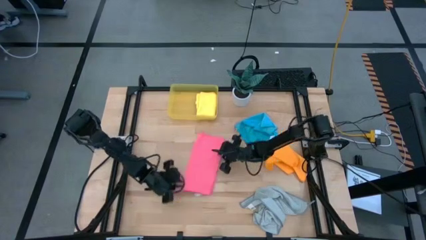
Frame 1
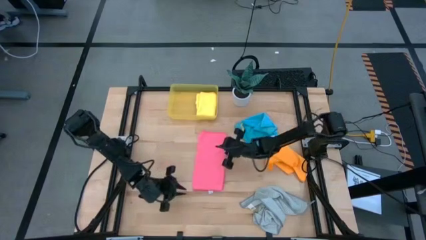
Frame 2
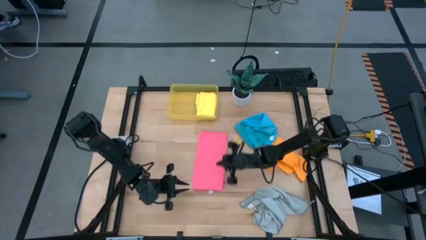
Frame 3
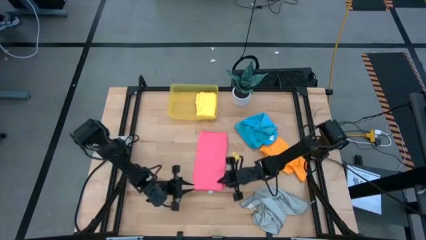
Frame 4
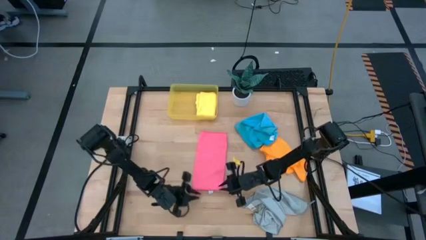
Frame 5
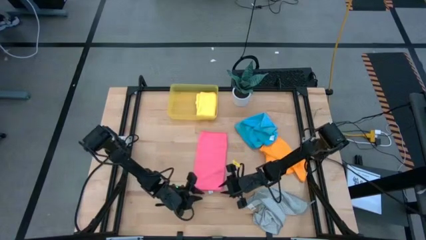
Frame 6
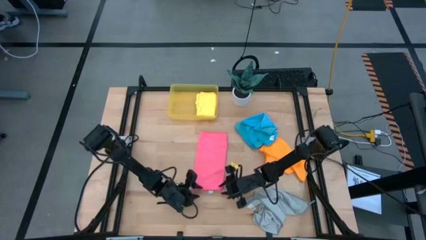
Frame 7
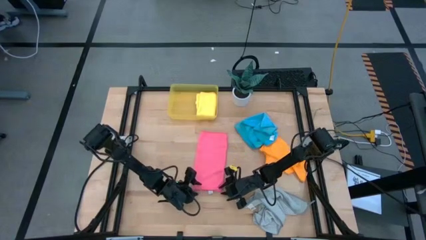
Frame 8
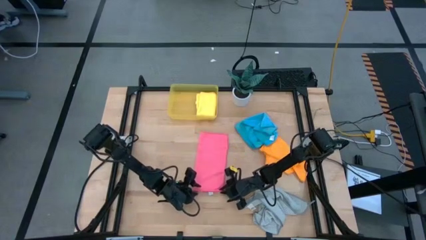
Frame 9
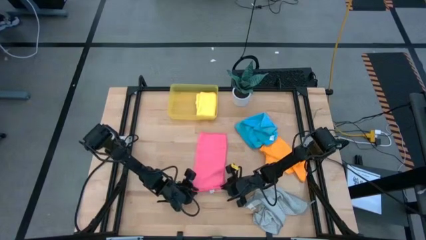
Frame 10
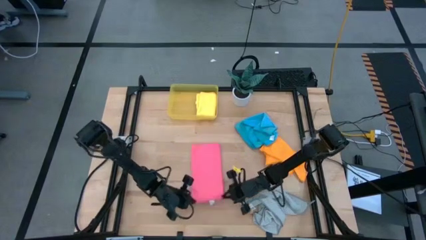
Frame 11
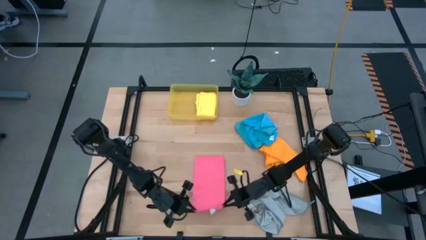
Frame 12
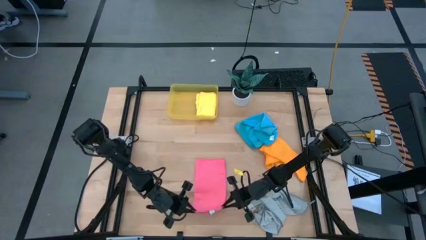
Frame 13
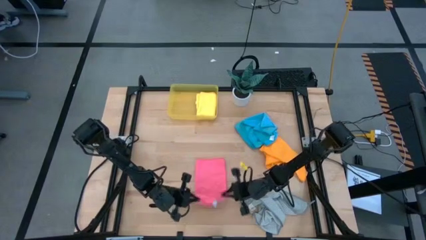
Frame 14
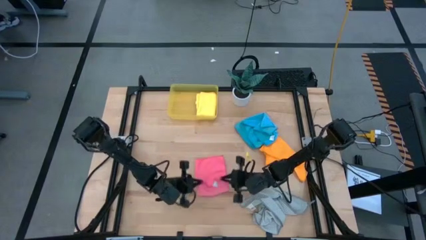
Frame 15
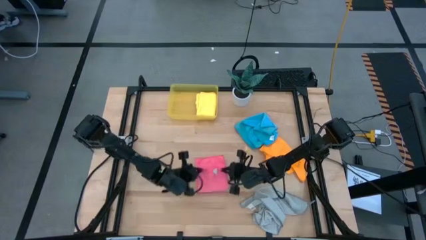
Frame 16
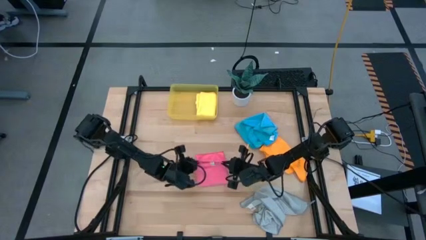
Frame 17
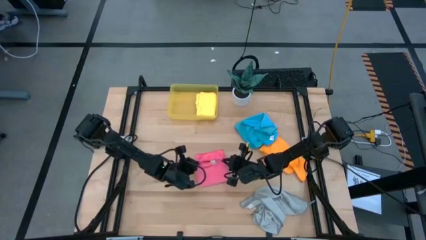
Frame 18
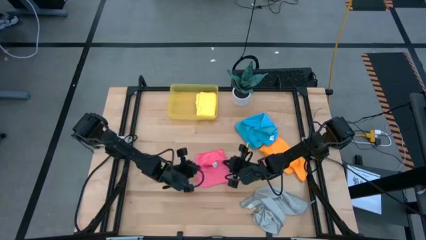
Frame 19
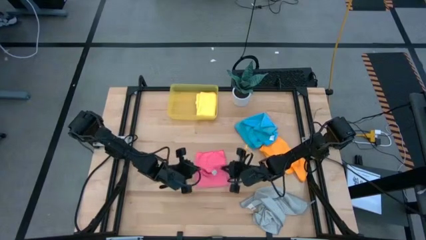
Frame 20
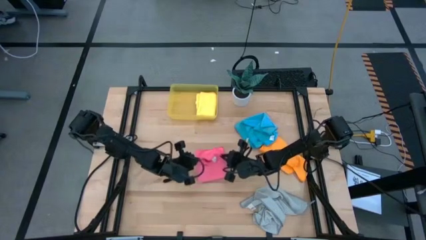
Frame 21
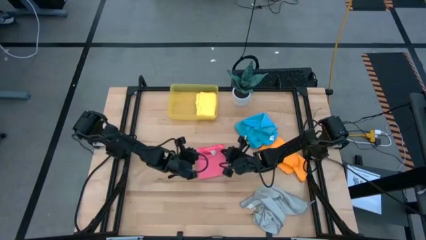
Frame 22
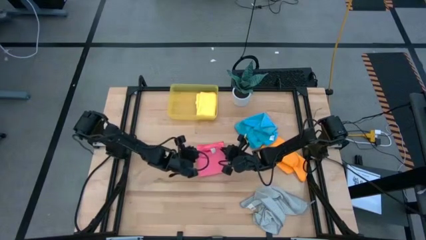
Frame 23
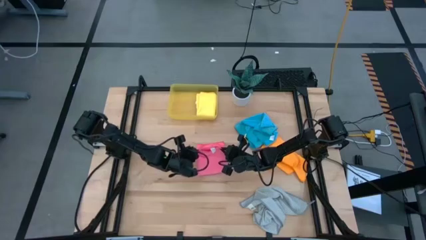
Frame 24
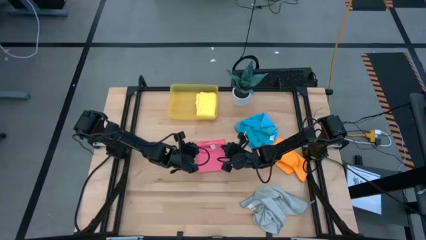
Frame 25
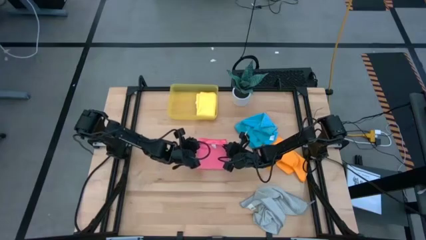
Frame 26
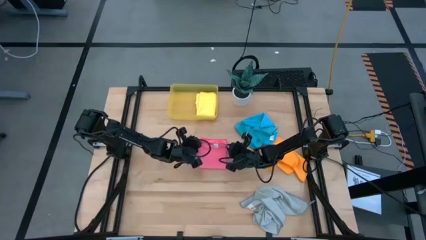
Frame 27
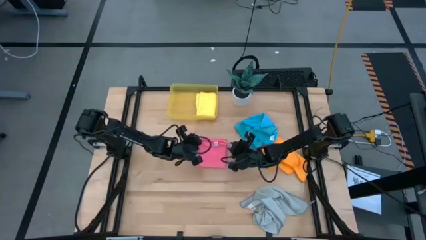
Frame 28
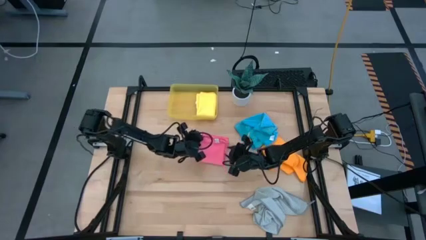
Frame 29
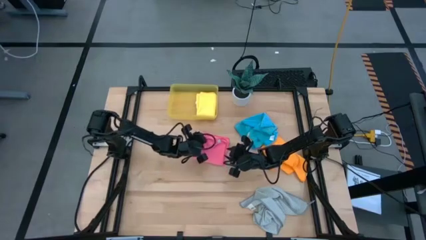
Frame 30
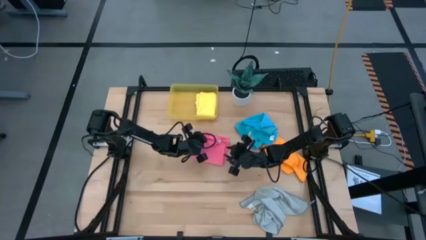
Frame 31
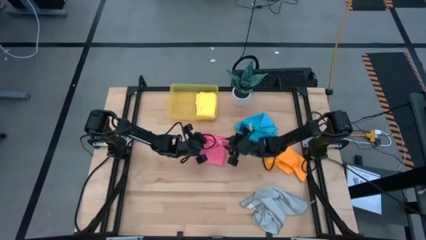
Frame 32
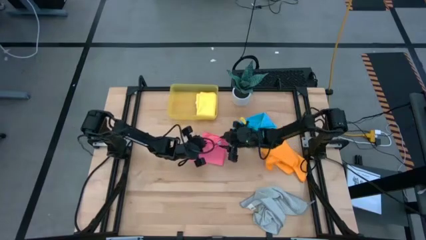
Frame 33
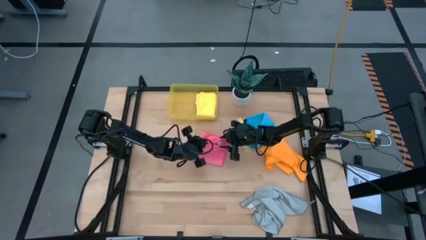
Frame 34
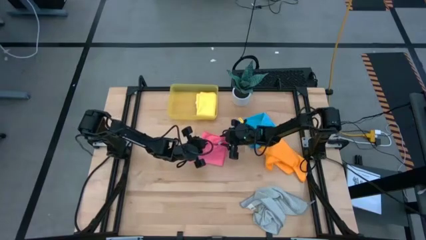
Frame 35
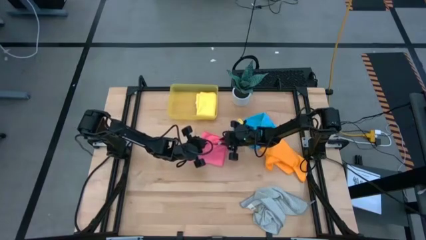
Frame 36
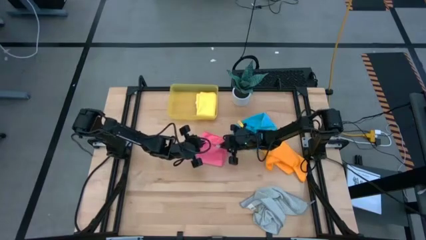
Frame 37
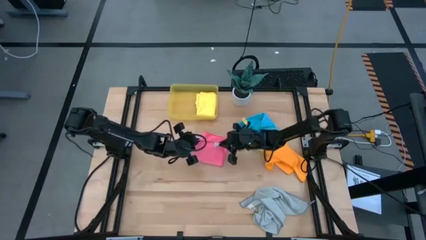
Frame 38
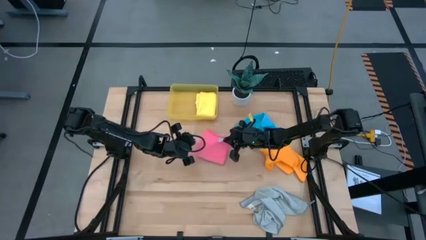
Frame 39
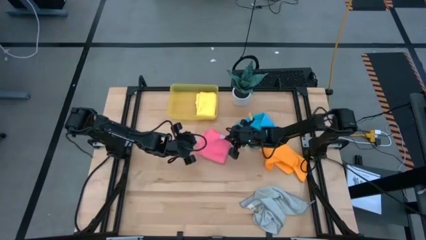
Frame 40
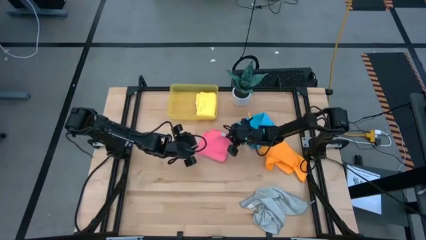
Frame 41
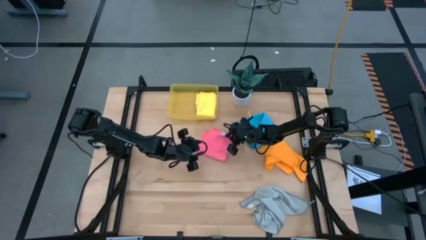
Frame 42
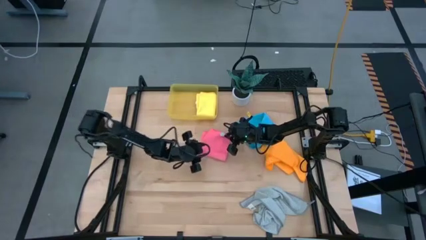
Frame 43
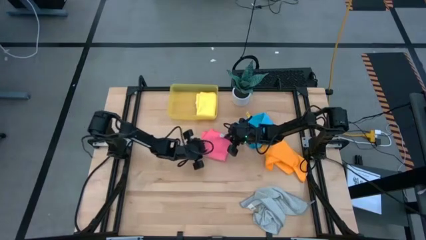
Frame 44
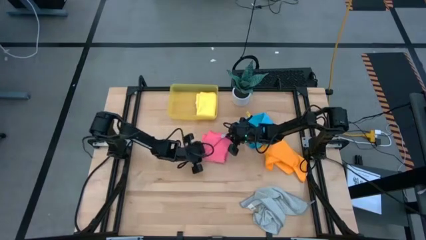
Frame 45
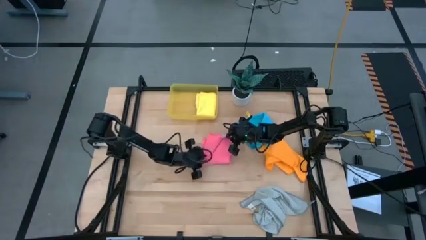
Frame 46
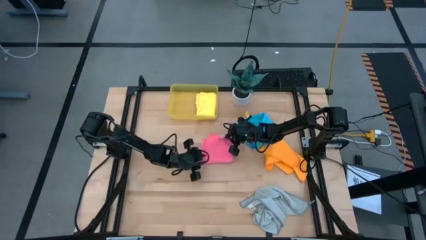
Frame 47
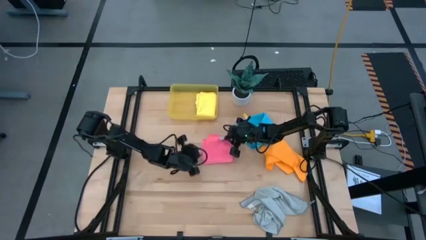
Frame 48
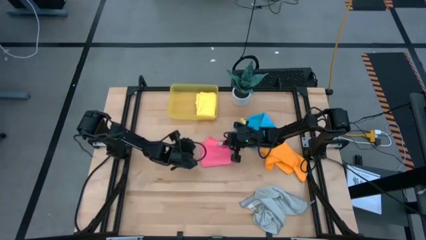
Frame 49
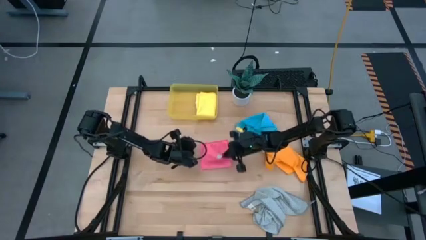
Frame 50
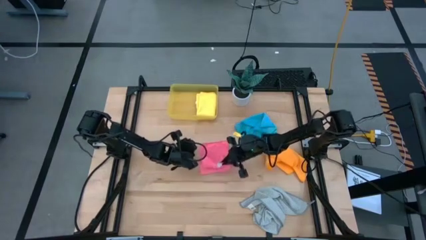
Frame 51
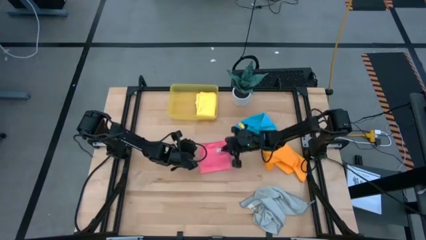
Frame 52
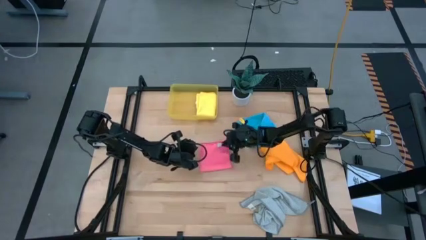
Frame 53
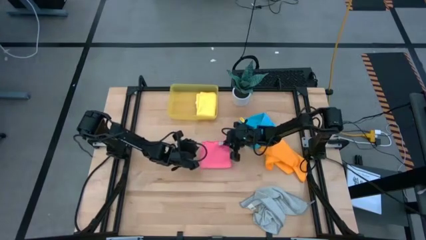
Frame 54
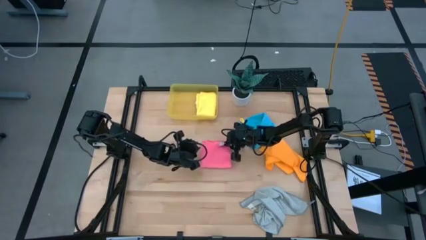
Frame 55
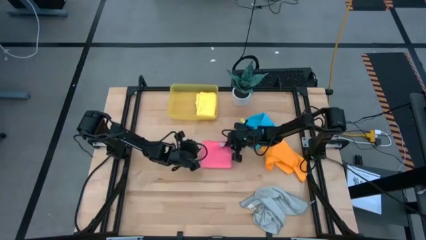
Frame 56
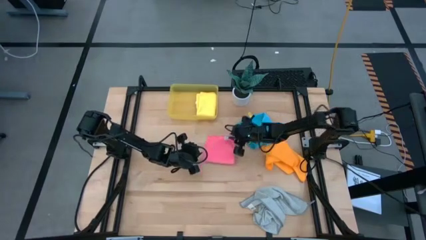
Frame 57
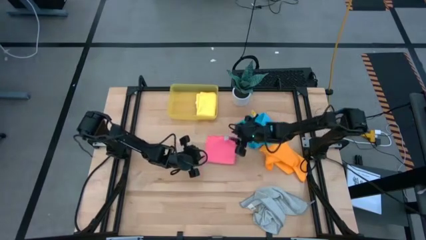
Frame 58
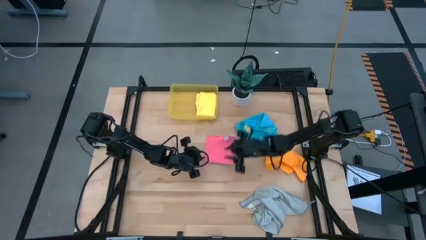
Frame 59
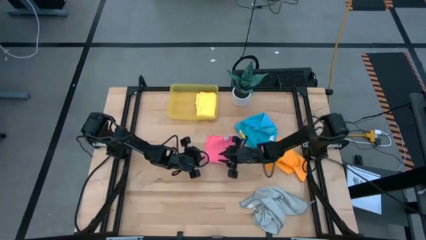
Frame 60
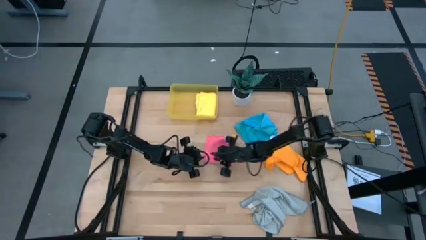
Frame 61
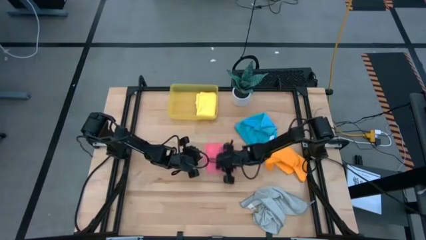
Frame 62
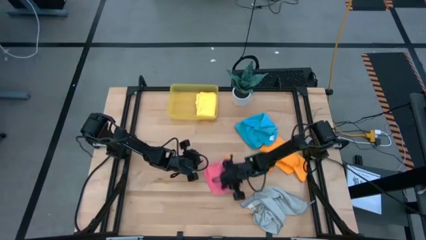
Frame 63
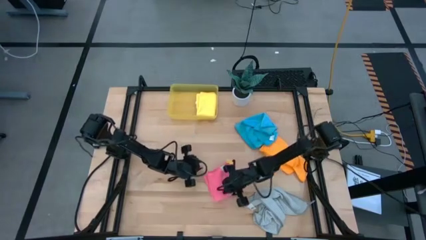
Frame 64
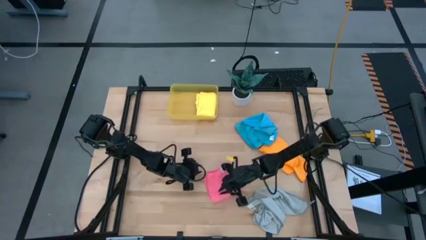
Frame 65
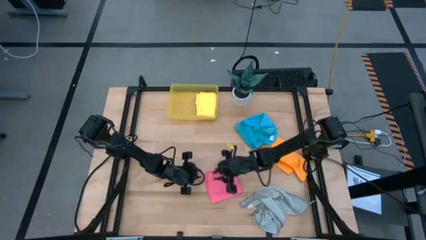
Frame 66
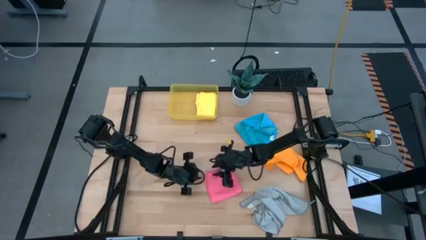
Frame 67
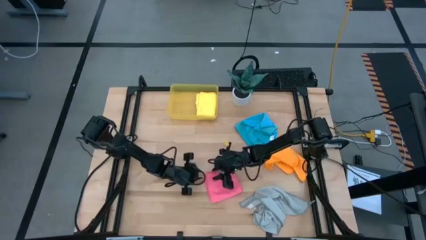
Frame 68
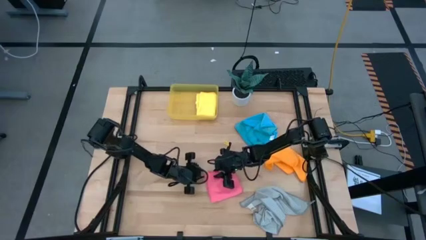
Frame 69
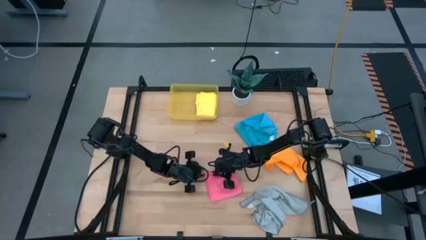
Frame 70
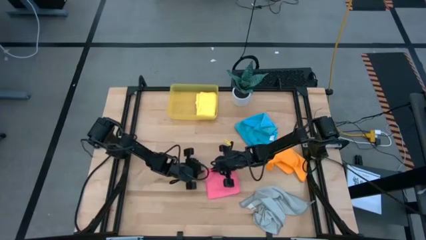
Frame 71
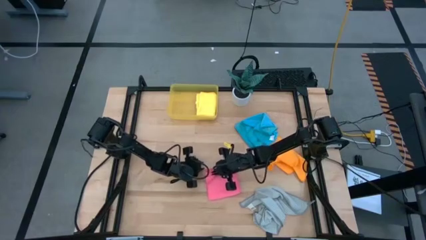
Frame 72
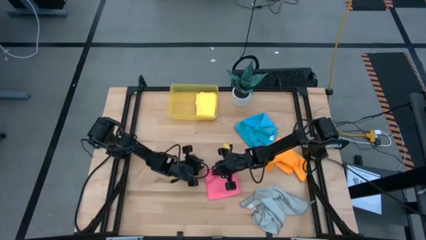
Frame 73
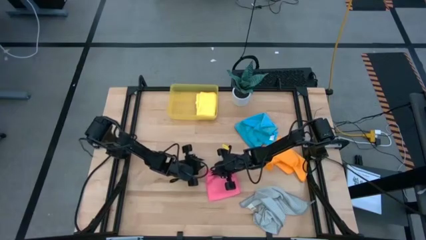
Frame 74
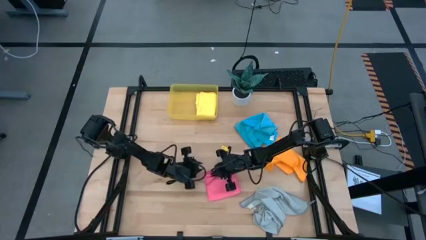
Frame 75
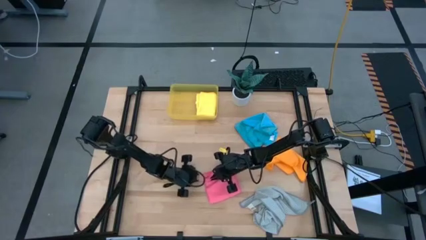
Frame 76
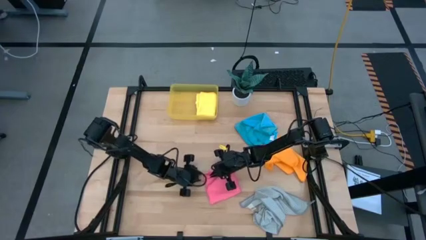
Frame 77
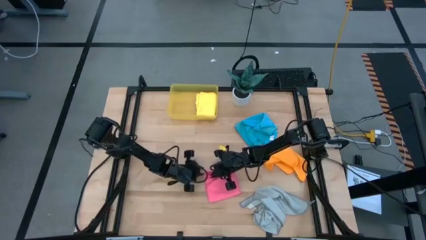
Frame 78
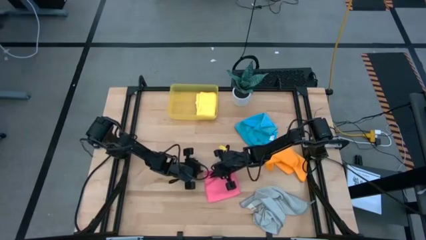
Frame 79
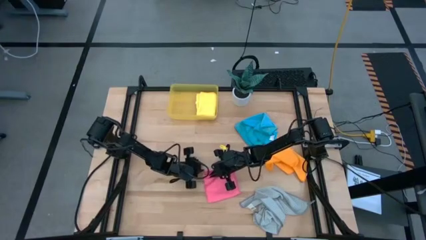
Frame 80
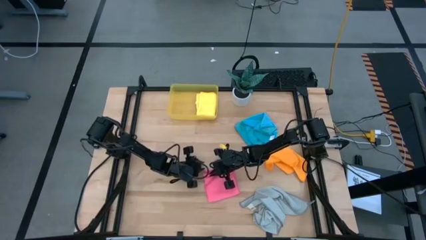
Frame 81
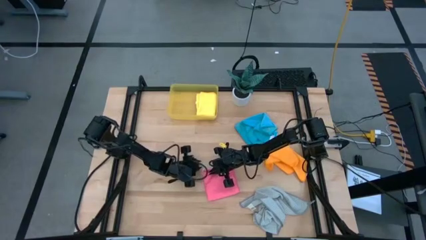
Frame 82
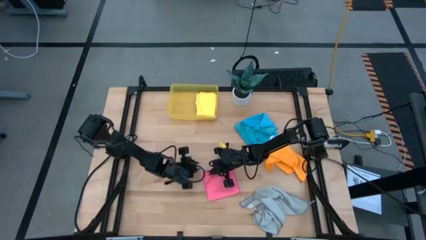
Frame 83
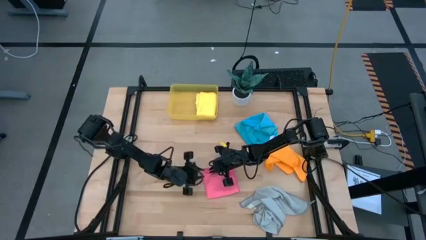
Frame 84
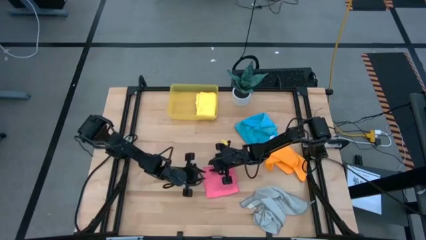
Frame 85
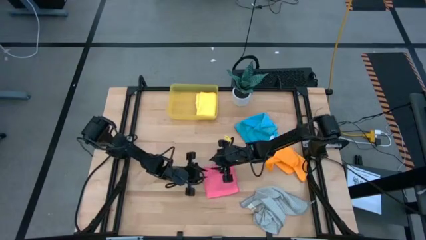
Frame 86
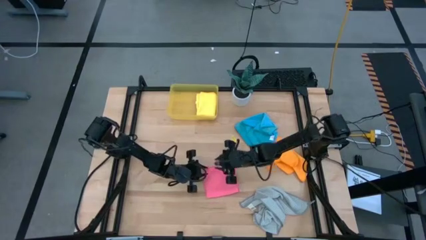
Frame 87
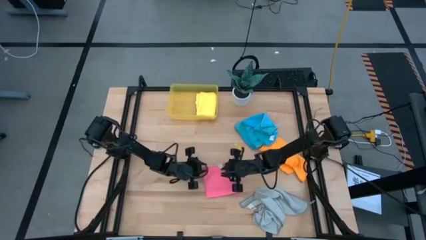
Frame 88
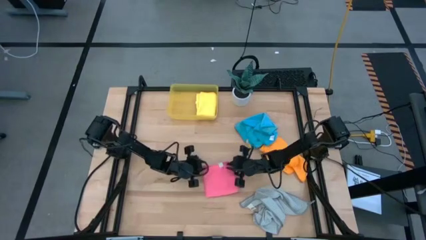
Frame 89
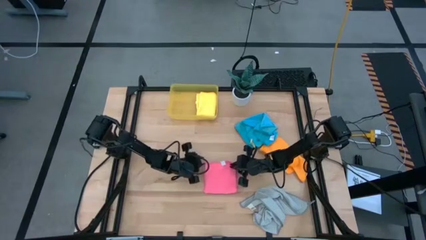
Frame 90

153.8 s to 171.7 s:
Task: Fold microfiber towels
Fold the pink microfiber cloth
